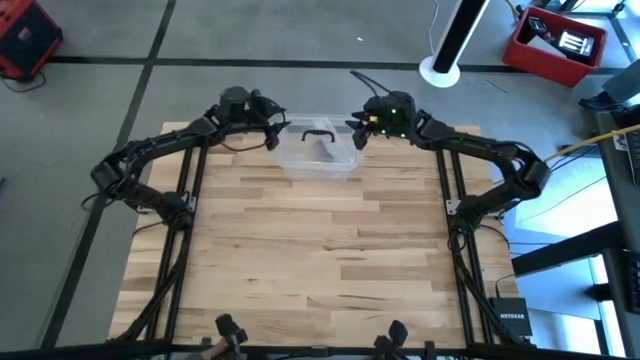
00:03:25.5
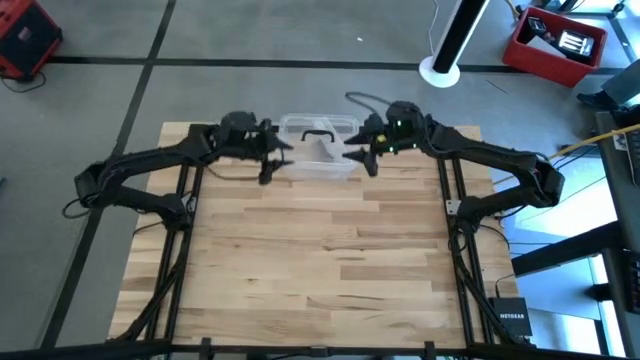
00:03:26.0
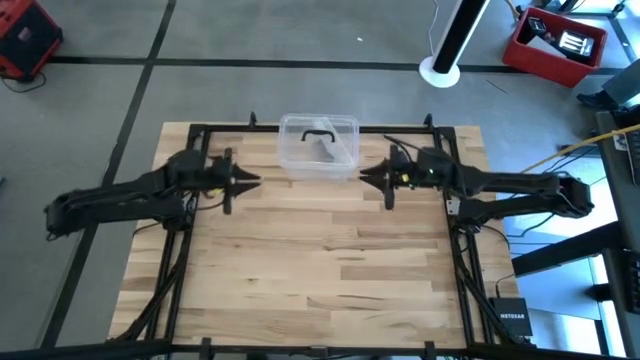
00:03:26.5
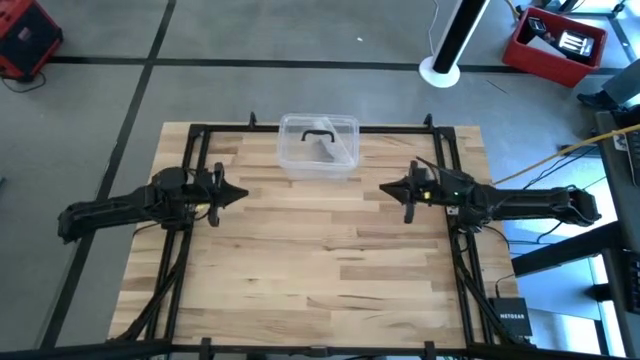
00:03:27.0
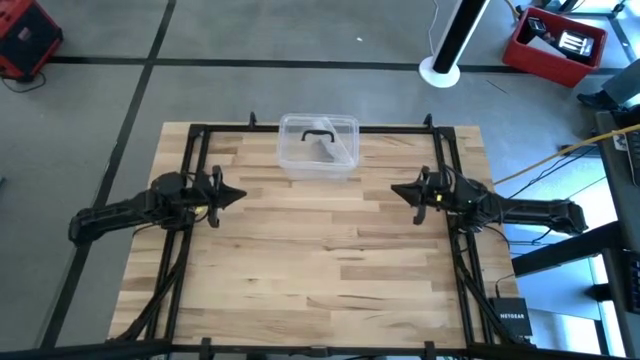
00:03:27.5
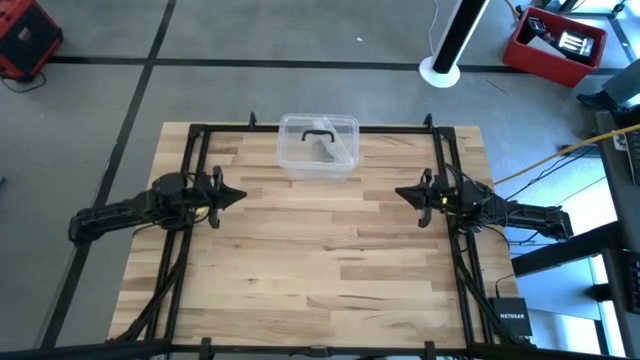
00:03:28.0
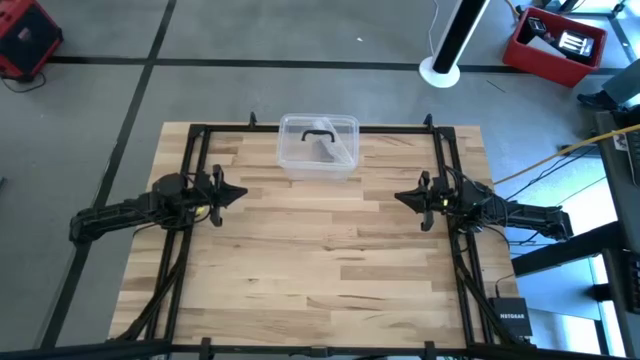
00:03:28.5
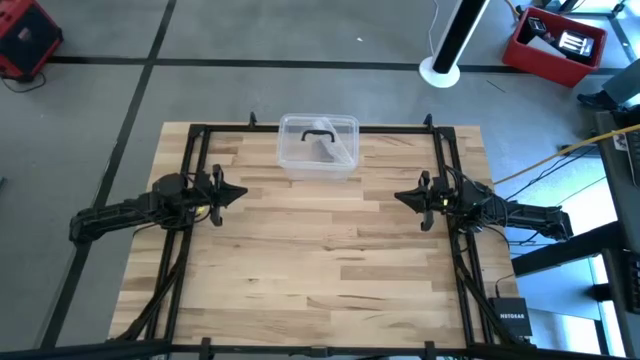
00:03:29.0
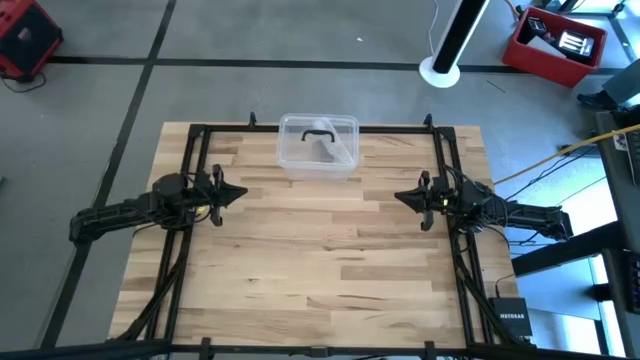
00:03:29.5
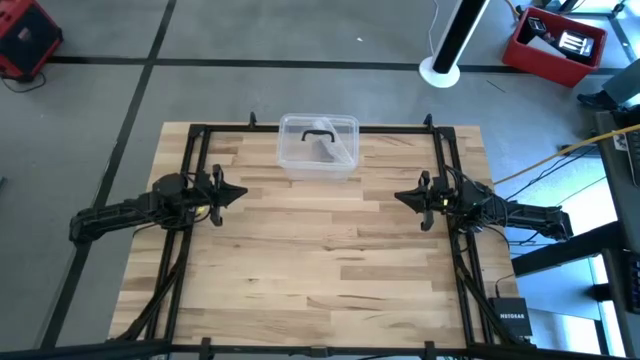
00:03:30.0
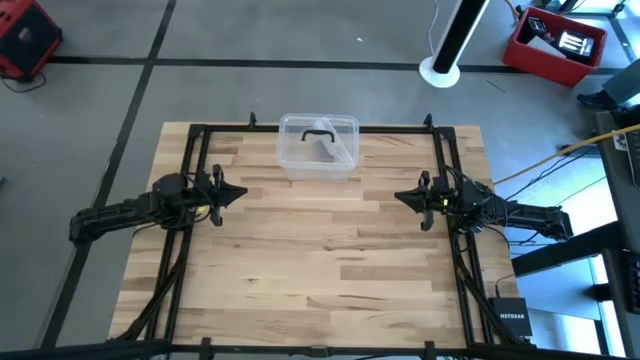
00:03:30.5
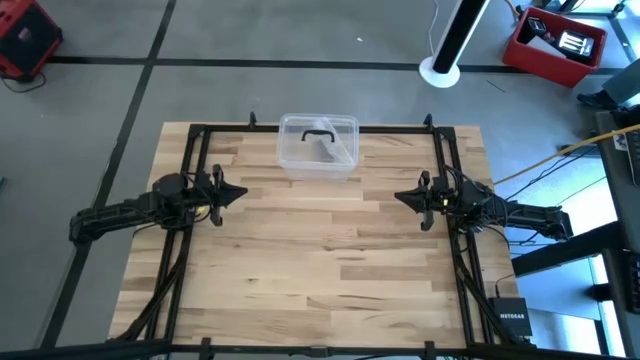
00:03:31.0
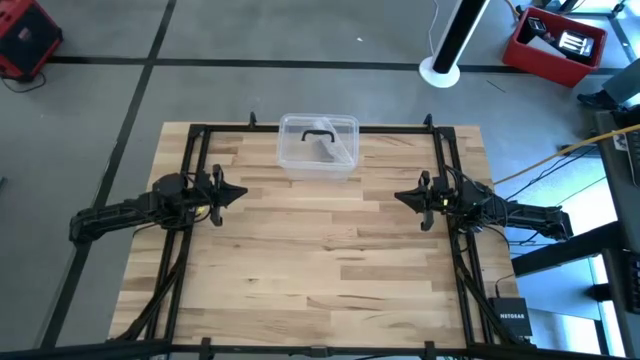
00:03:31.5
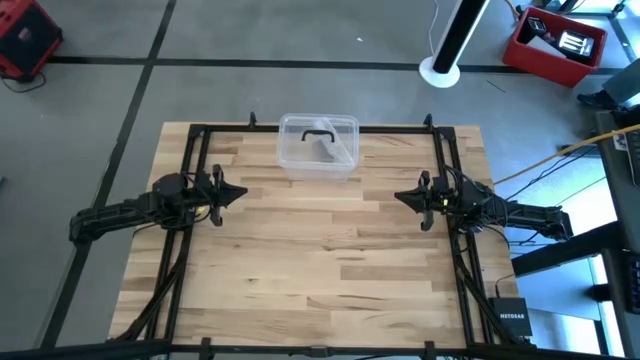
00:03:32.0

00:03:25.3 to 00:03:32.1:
Task: Roll bandage
Return to Home Position

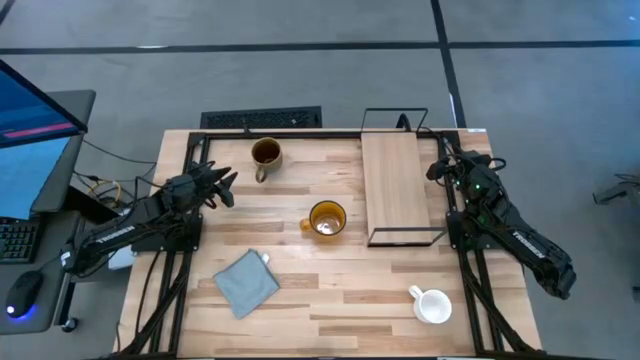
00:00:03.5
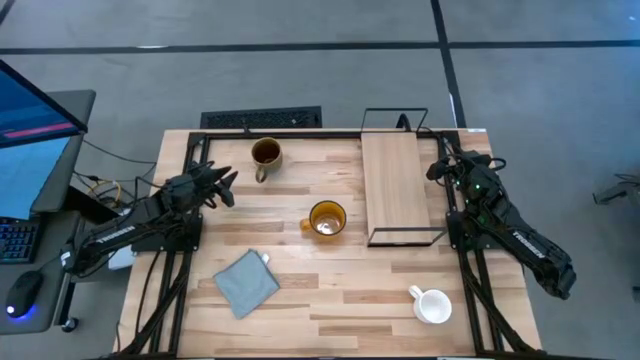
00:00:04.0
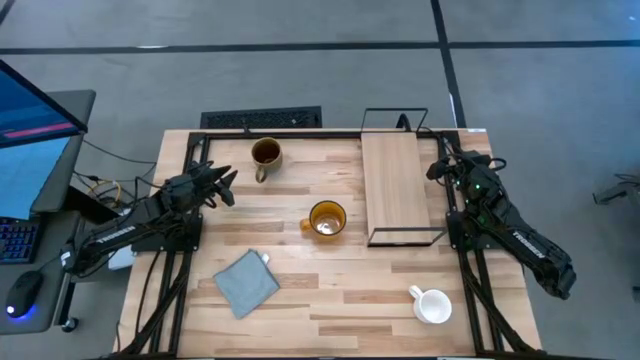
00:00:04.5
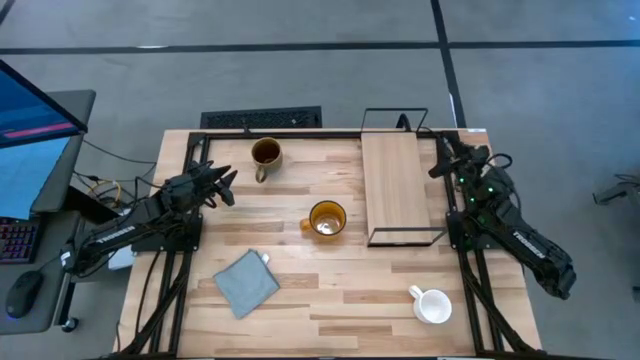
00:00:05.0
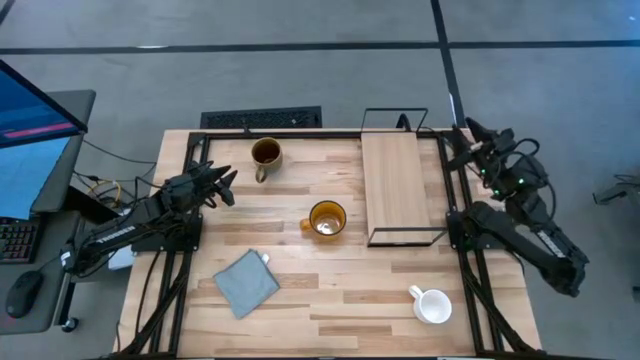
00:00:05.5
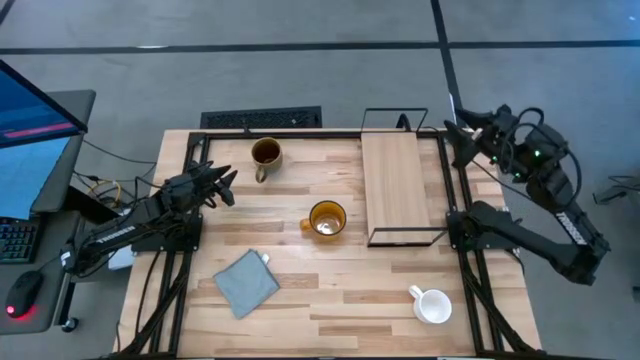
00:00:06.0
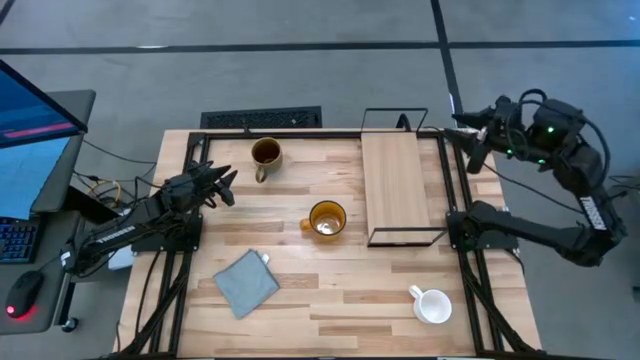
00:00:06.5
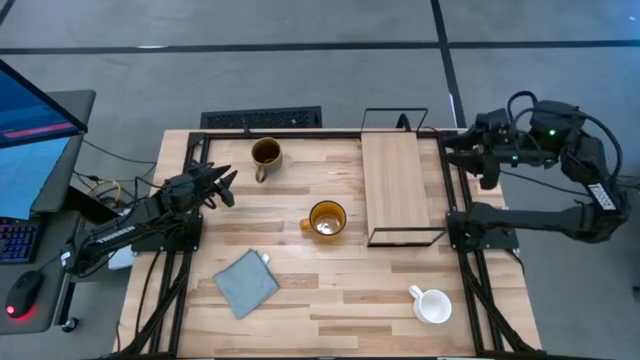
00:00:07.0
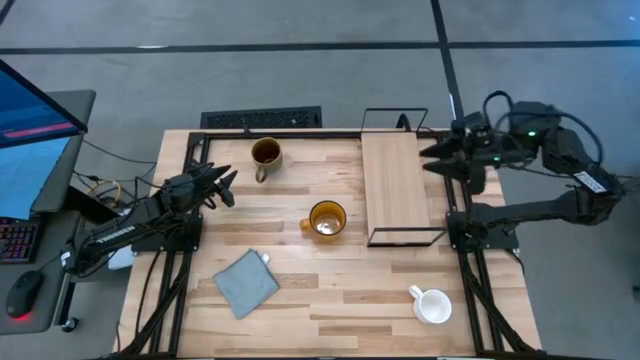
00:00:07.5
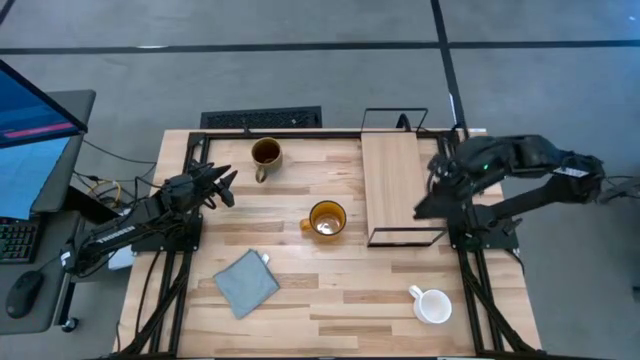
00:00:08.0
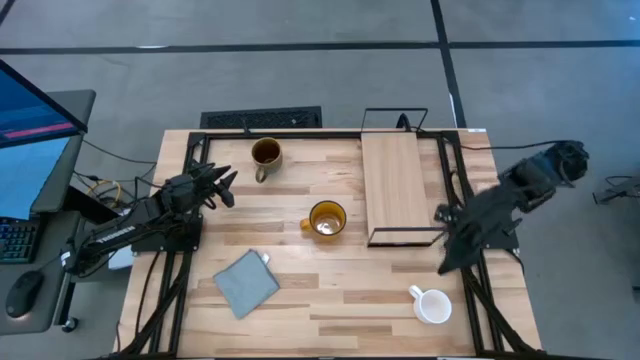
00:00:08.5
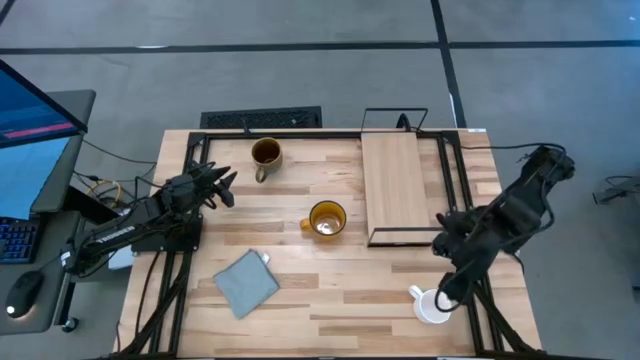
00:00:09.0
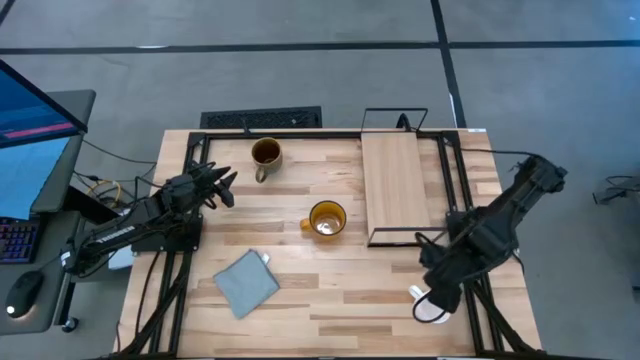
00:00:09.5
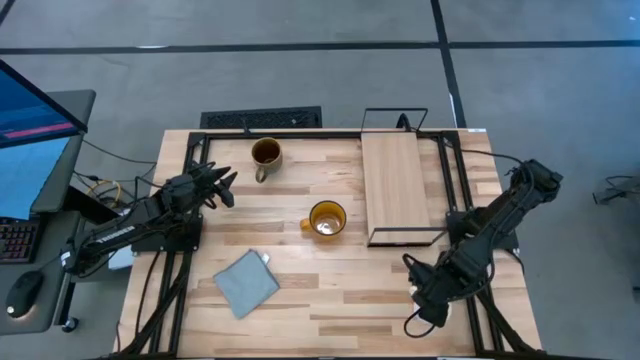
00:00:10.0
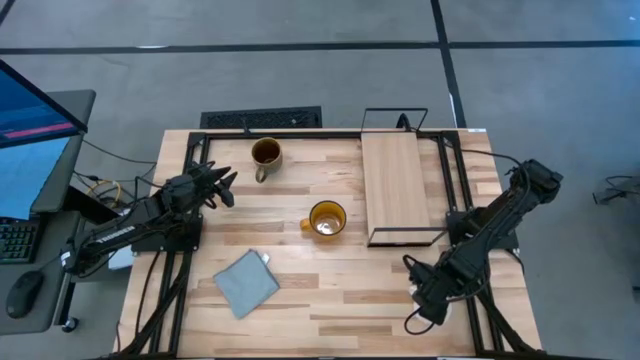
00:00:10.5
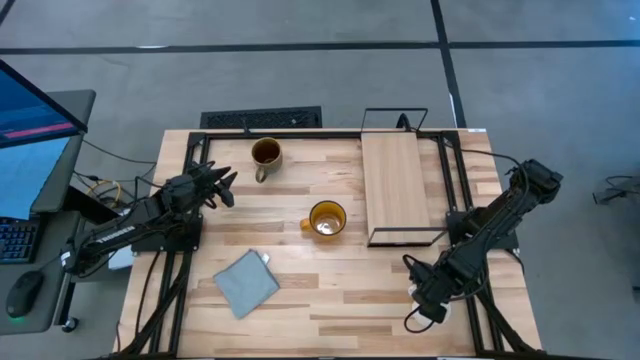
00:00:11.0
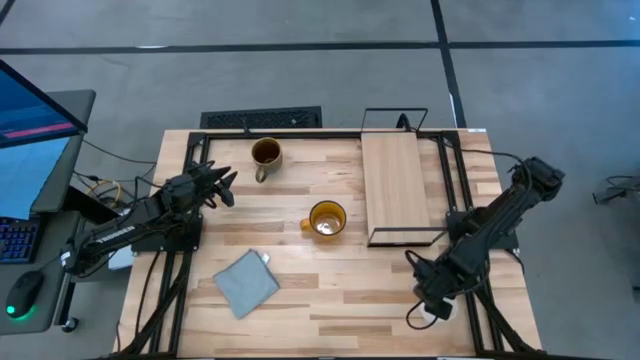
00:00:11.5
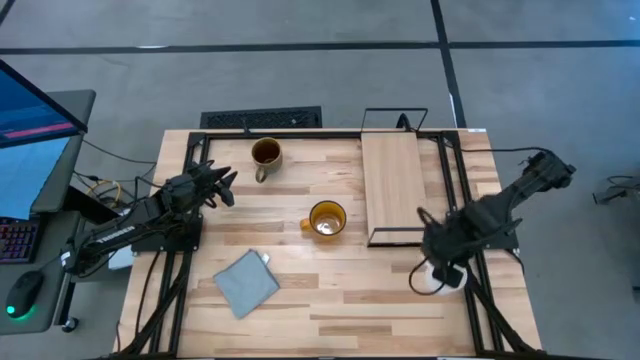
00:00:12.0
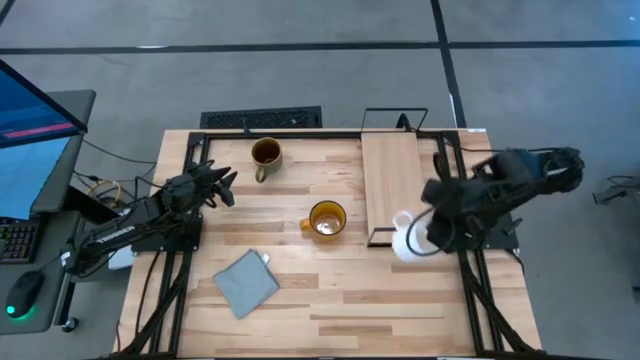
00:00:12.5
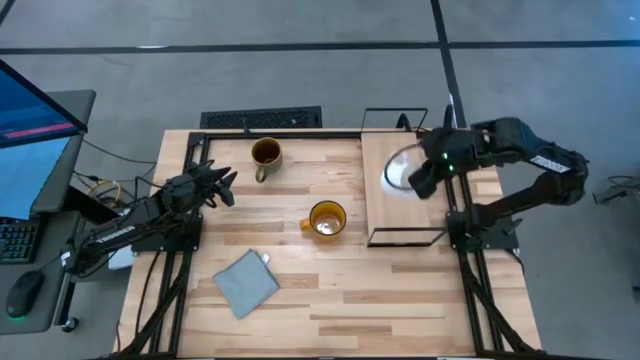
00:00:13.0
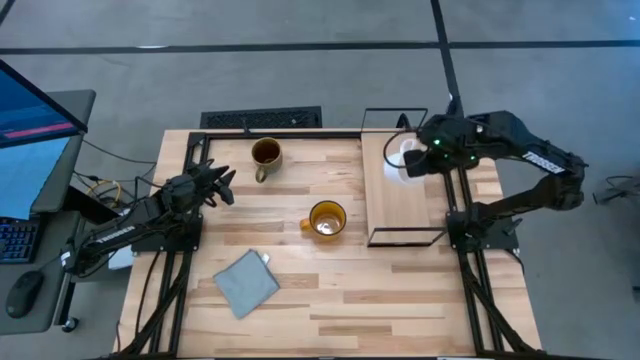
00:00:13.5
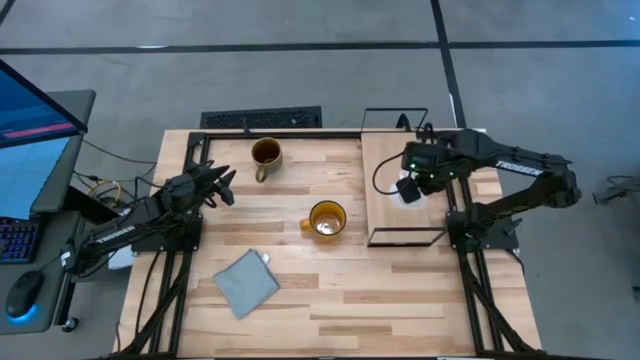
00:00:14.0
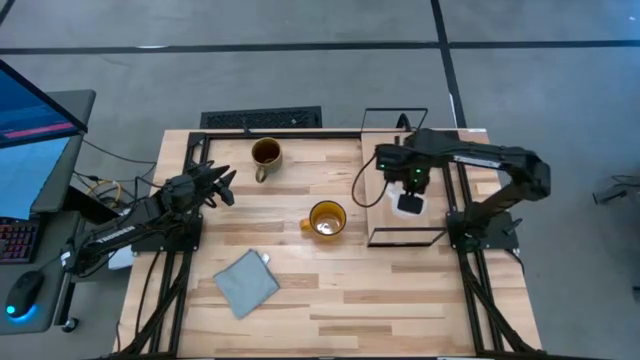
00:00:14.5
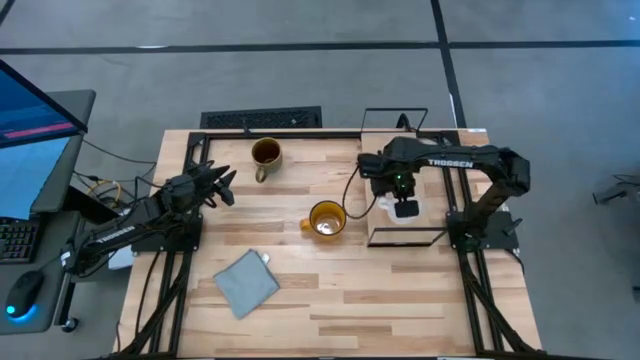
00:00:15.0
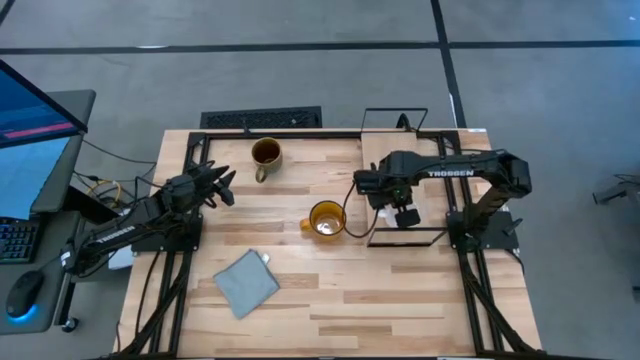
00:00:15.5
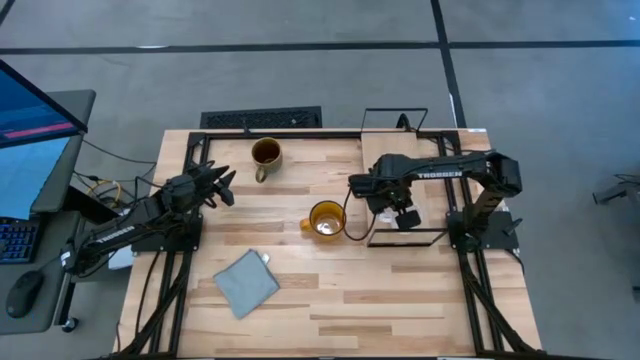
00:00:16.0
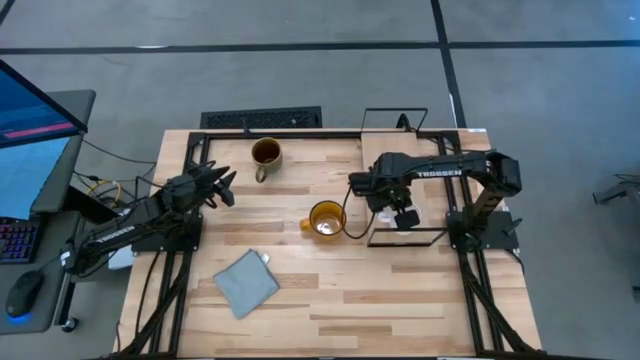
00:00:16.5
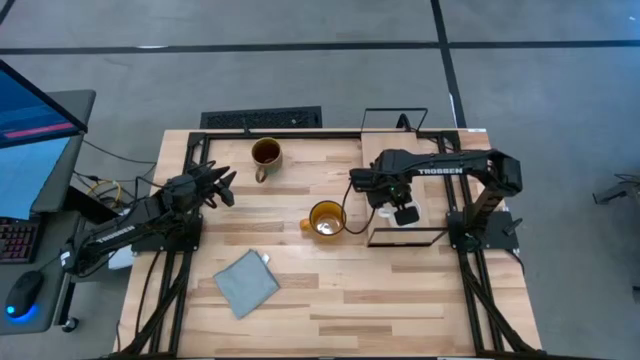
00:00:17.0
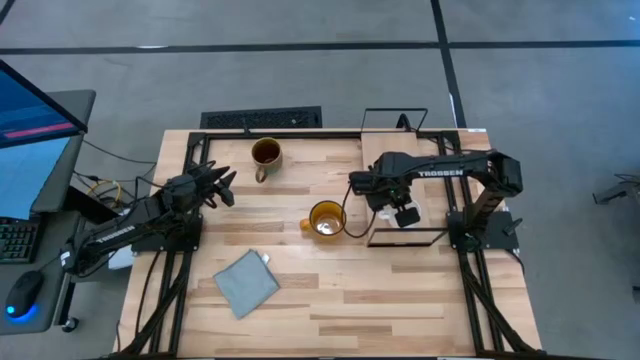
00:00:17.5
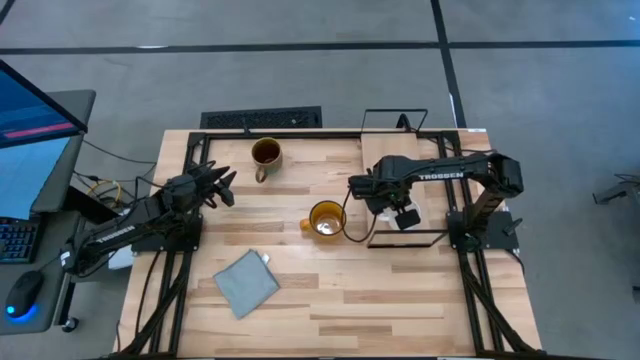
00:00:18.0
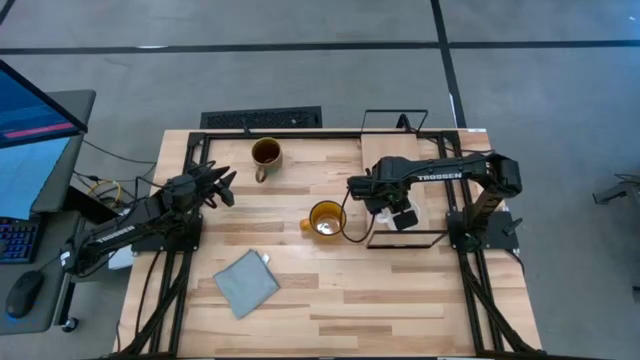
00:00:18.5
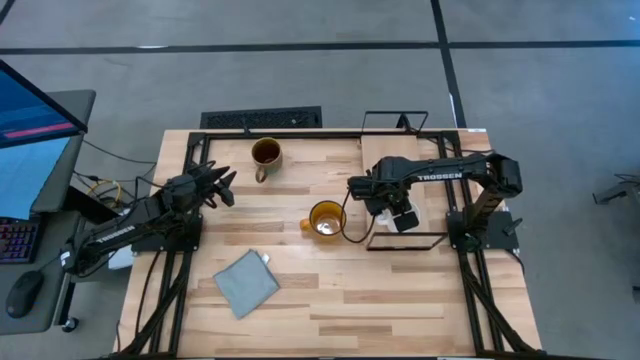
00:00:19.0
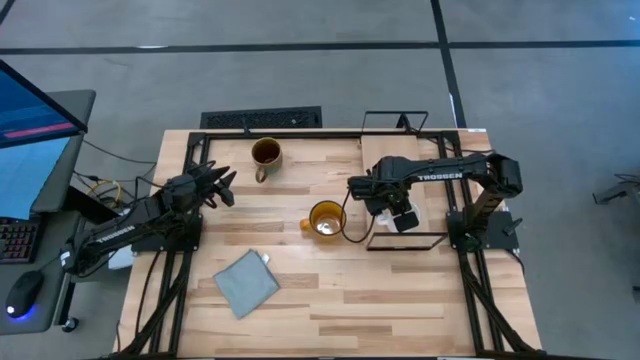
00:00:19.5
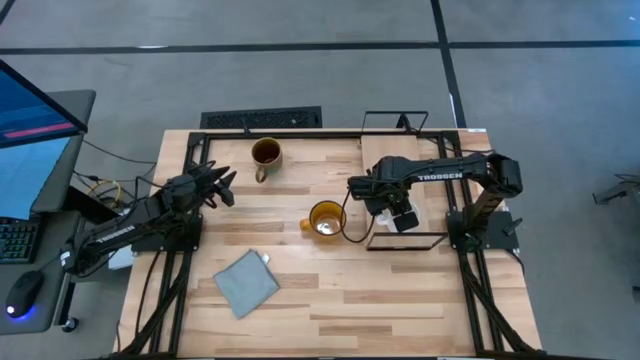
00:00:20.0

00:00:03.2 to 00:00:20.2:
Task: Stack small to large cups/mugs on shelf
Put the white mug on the shelf
